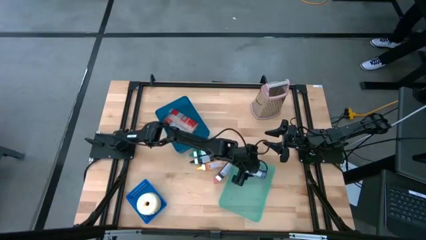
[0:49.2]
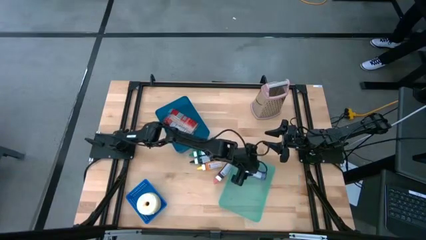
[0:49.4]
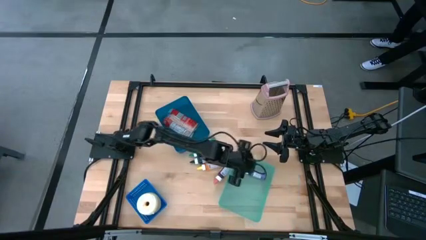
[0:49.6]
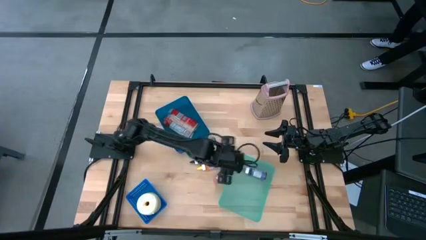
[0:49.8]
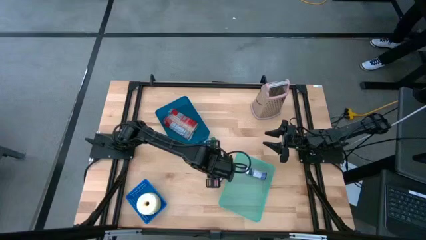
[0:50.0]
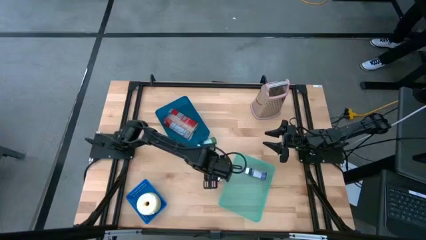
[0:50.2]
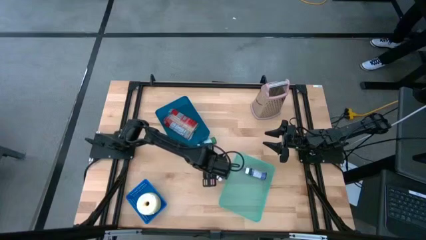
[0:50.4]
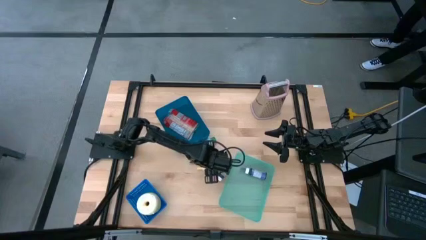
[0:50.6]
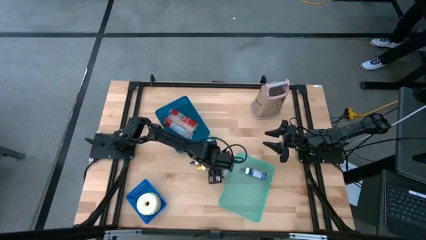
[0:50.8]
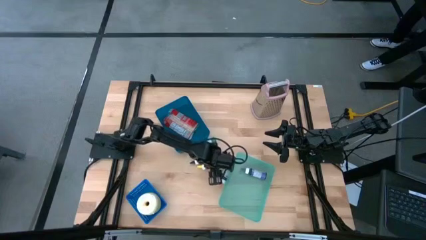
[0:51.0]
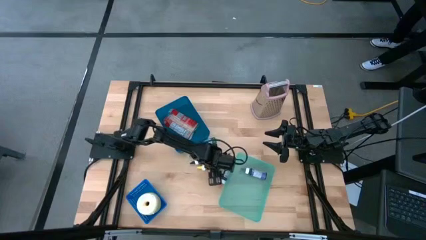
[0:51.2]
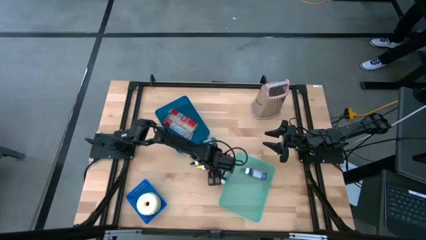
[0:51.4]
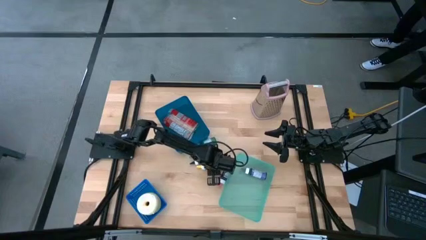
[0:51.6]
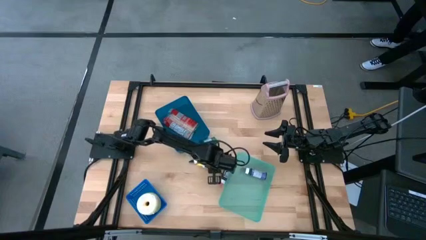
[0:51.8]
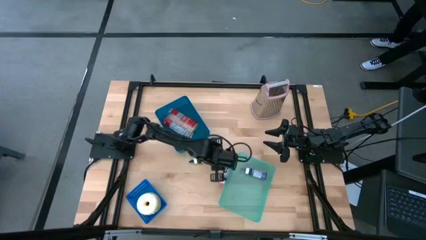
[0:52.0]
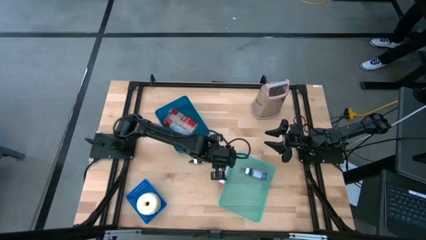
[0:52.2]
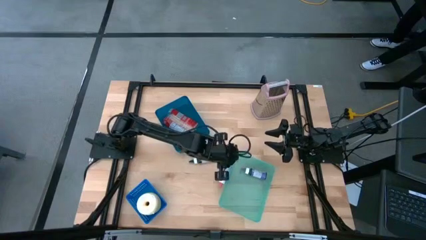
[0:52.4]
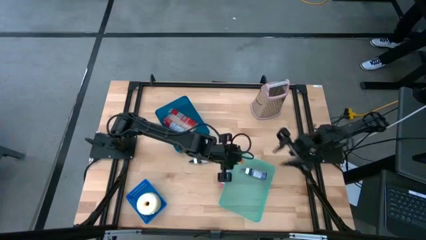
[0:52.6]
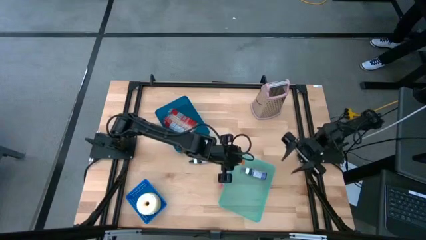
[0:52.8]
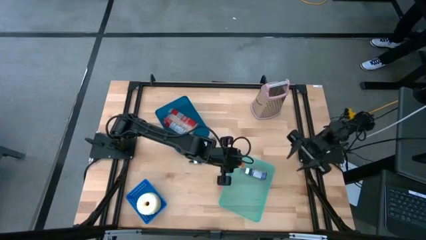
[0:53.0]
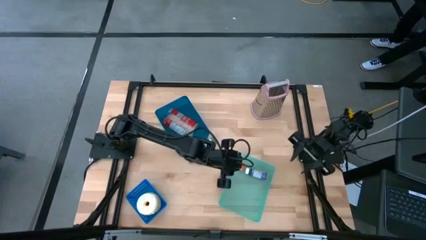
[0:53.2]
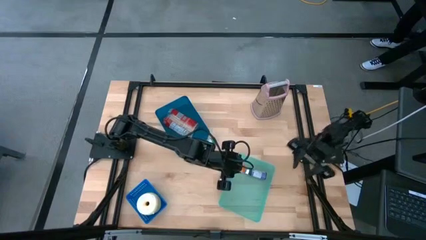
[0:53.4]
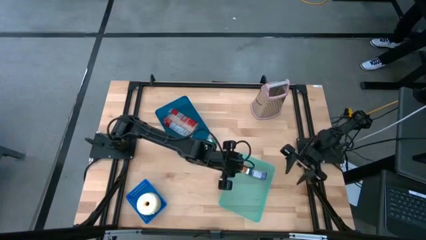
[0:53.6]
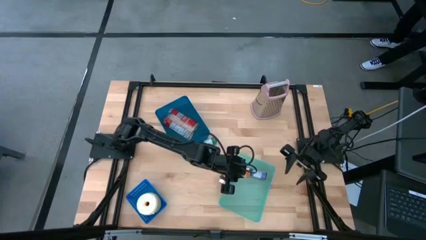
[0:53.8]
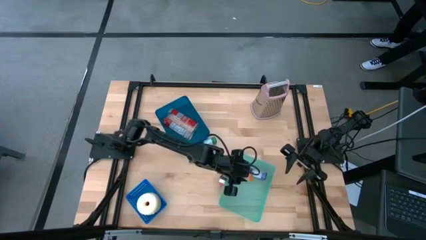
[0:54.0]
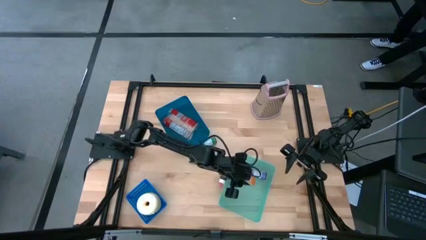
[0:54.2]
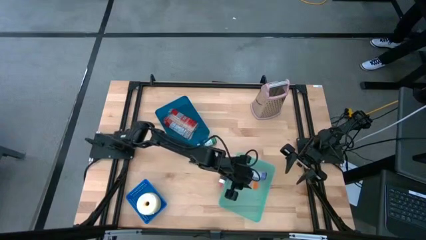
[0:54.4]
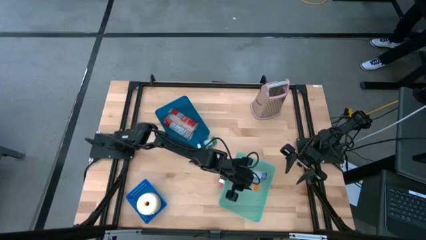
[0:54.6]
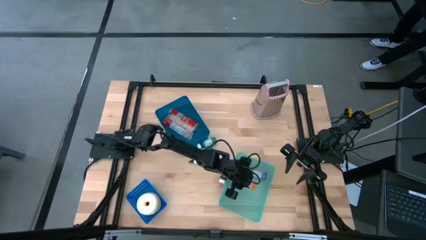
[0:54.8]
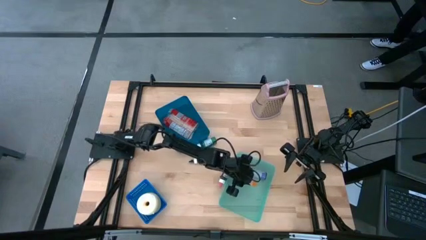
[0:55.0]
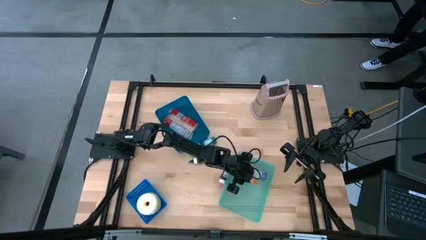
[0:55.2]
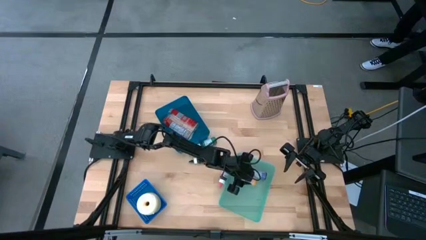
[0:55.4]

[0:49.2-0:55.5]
Put the yellow food coloring bottle into the green bin

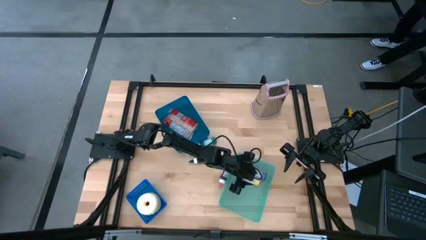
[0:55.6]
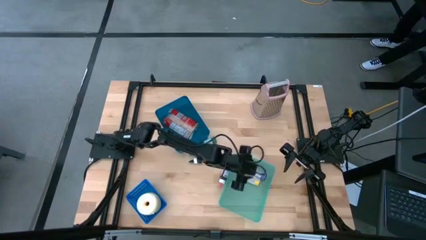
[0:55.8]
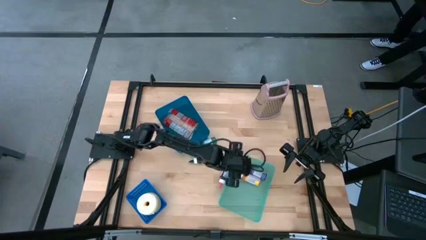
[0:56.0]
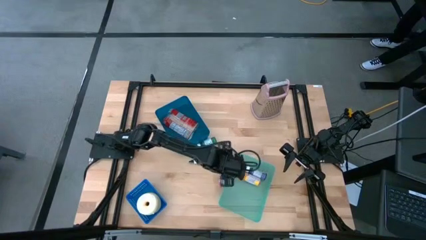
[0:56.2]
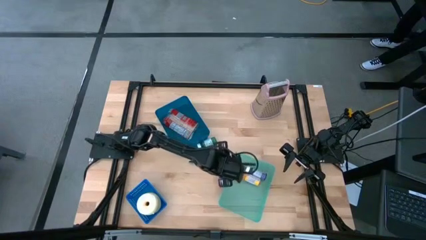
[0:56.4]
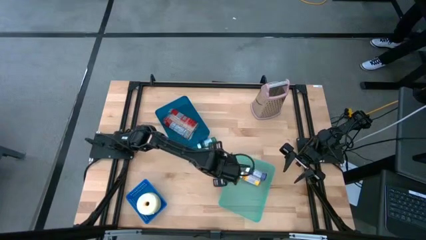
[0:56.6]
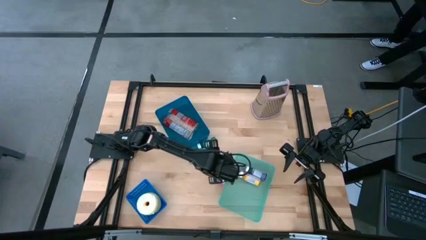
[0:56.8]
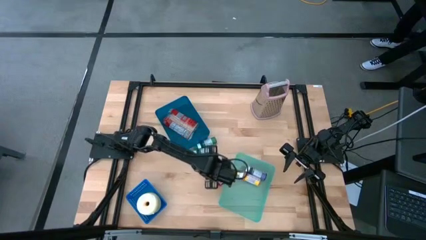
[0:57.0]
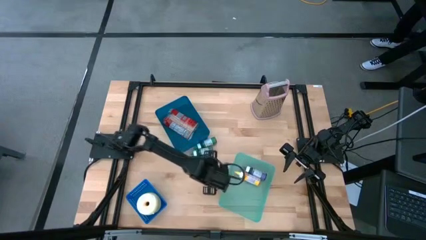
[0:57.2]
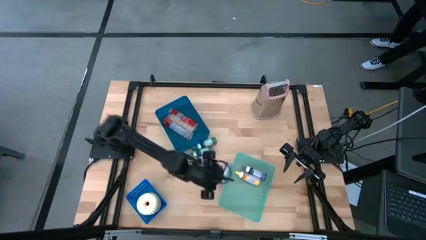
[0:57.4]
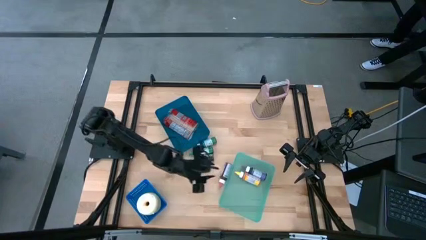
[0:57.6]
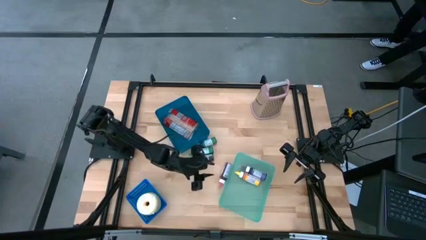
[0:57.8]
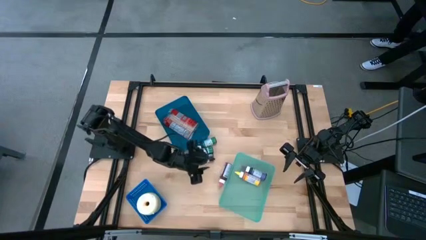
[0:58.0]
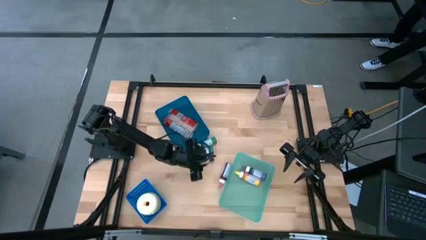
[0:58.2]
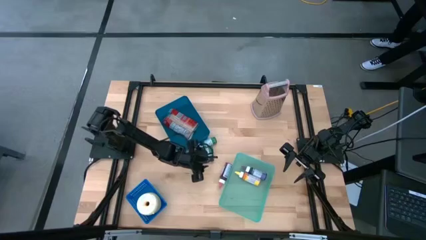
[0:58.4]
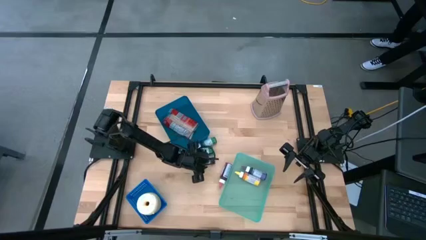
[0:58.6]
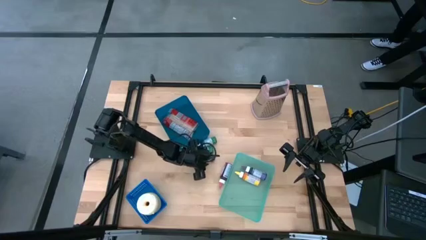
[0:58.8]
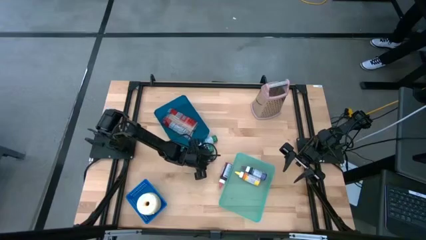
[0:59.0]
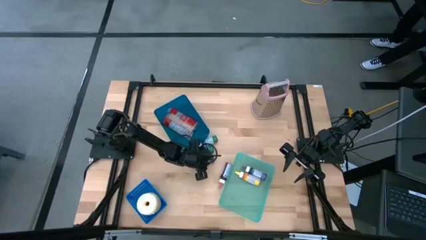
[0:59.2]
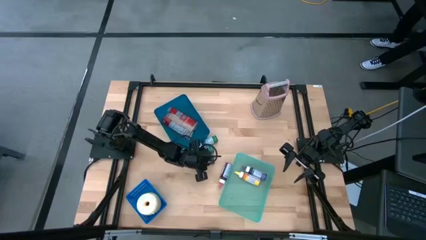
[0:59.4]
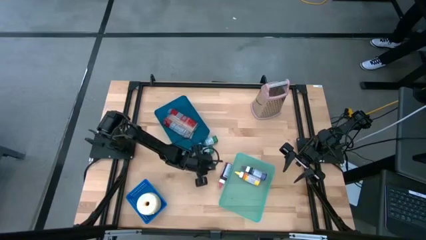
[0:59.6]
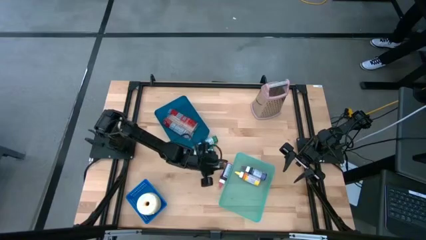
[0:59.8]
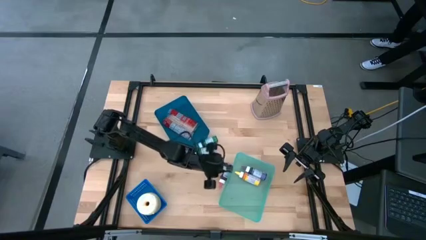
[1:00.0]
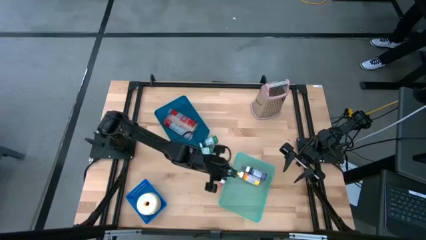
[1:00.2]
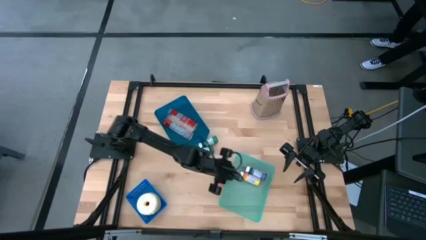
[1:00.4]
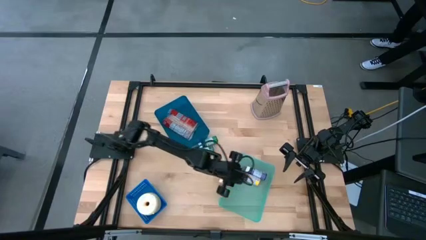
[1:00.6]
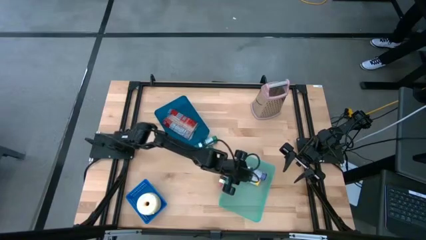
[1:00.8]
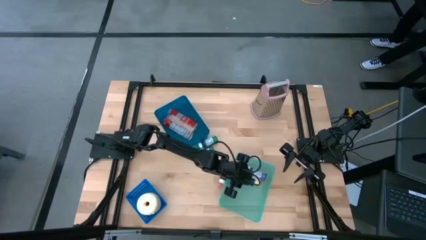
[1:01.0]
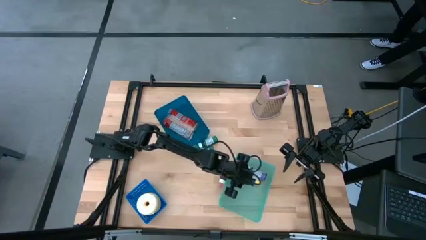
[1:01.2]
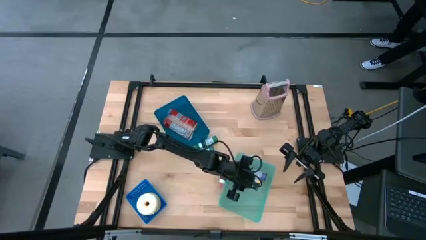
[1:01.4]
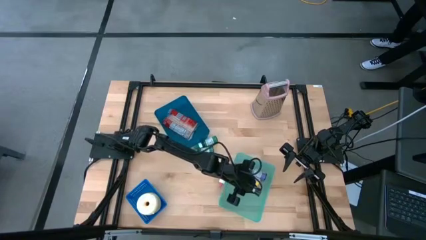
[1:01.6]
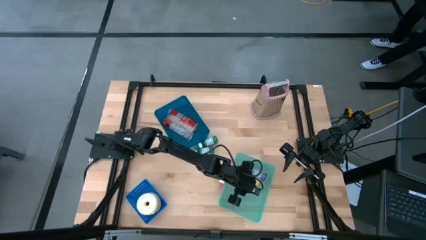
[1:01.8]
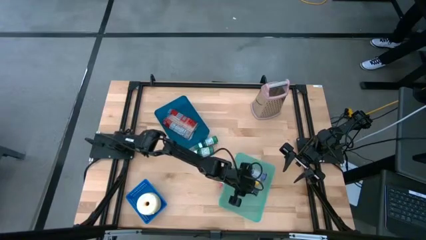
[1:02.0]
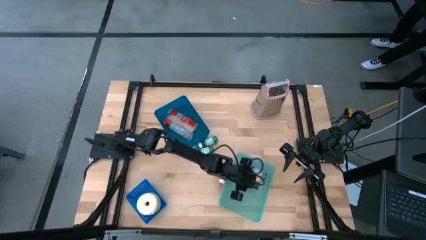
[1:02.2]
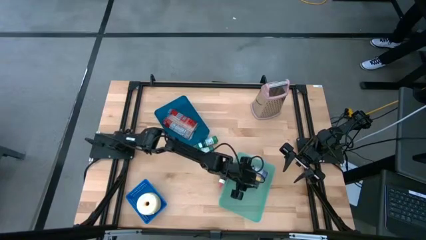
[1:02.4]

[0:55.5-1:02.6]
Put the black food coloring bottle into the green bin

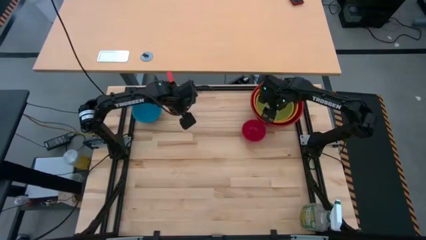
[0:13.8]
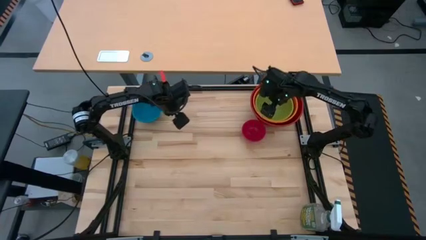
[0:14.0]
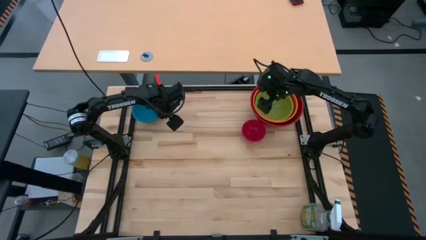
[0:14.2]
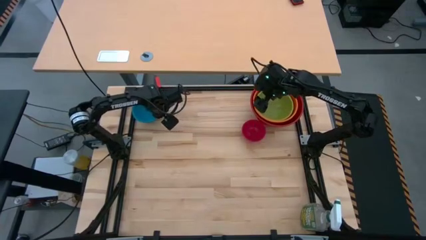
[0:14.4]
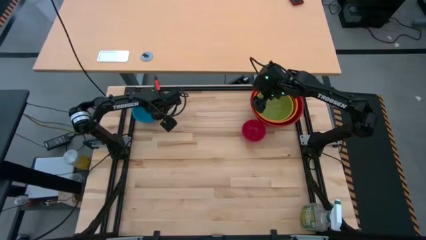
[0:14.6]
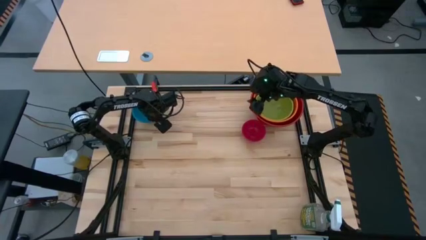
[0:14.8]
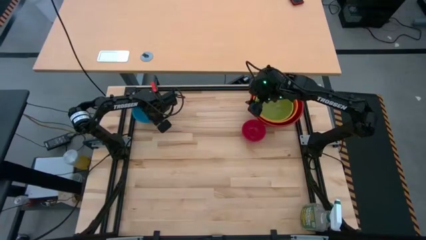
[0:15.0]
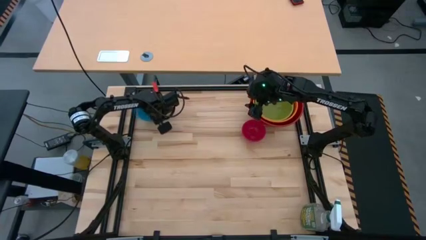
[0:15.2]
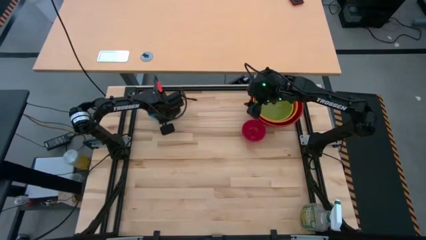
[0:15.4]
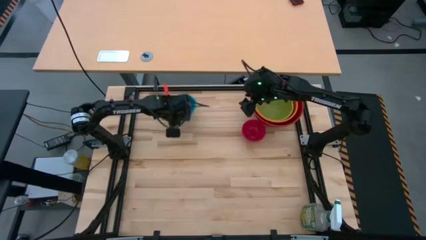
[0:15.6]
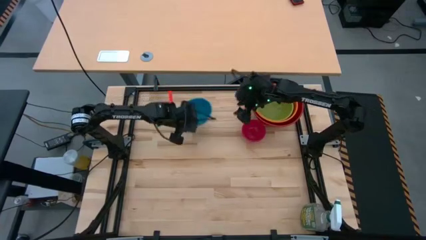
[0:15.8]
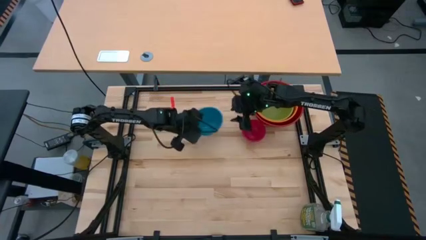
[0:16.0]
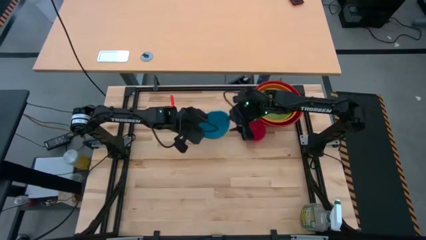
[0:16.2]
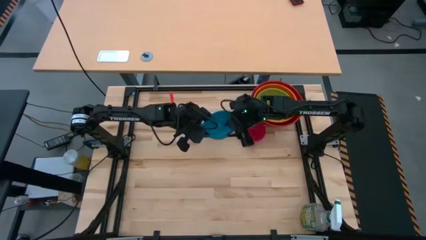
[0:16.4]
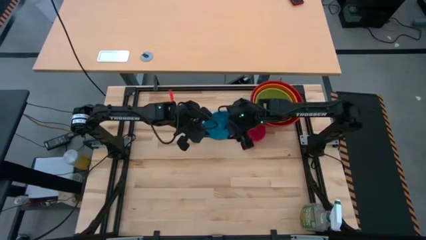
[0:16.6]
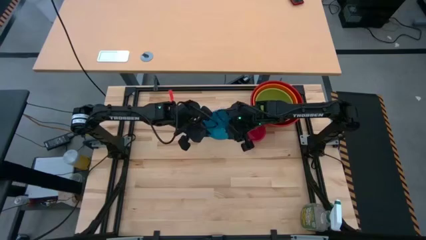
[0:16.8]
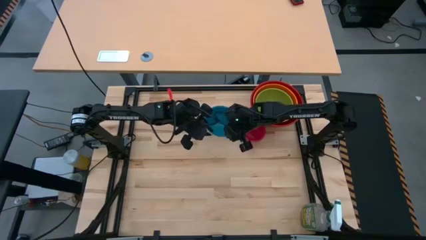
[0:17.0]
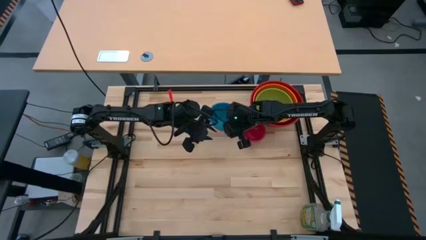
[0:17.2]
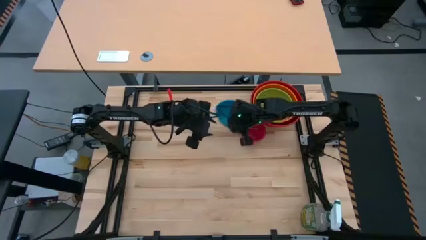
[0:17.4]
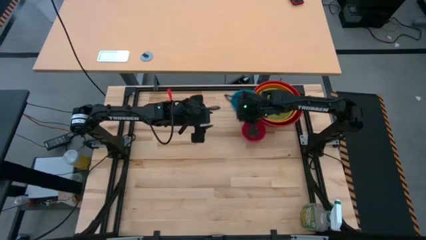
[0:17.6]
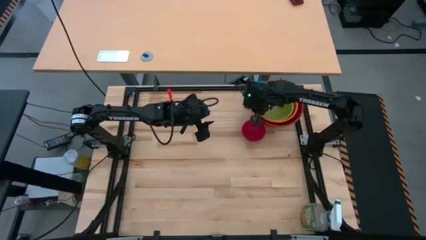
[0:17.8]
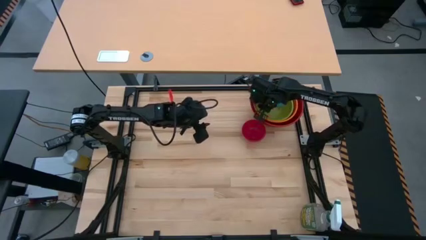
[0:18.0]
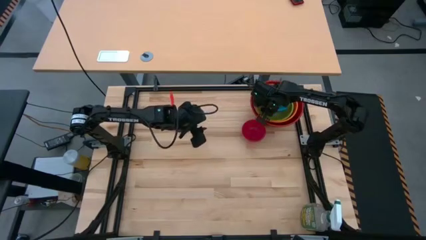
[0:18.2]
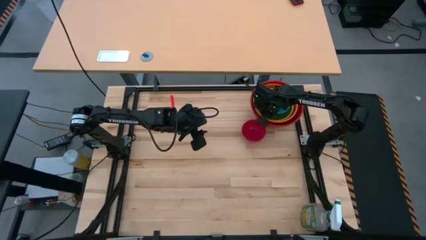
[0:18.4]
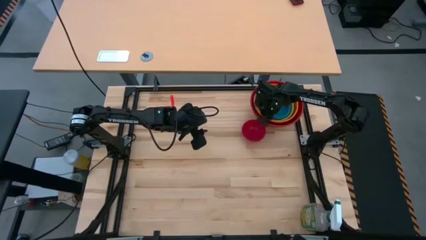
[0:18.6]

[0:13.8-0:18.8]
Stack the blue bowl into the green bowl
